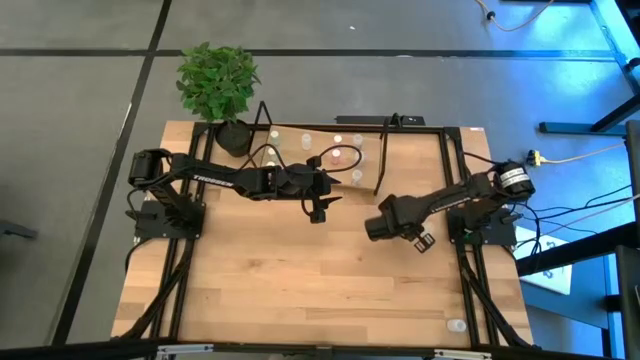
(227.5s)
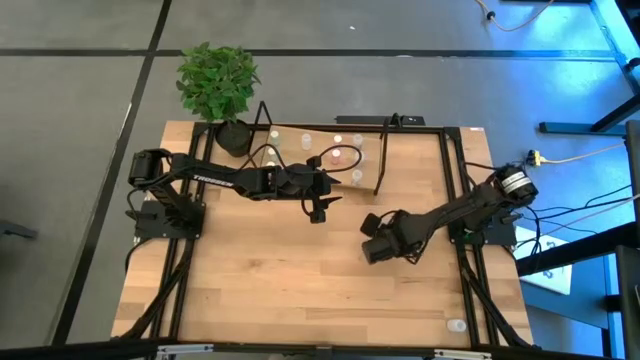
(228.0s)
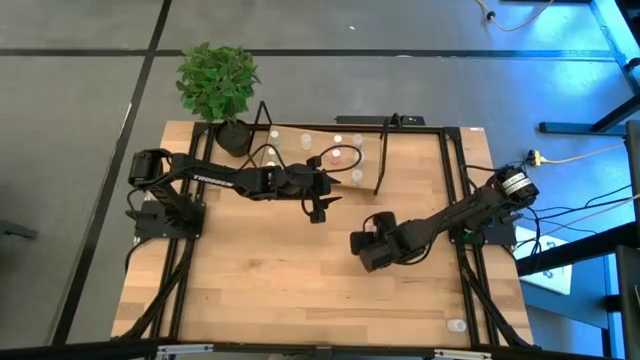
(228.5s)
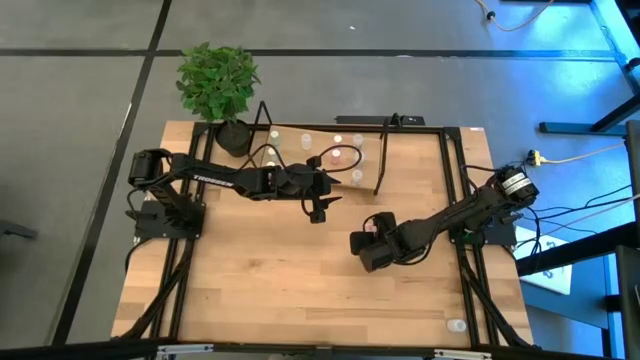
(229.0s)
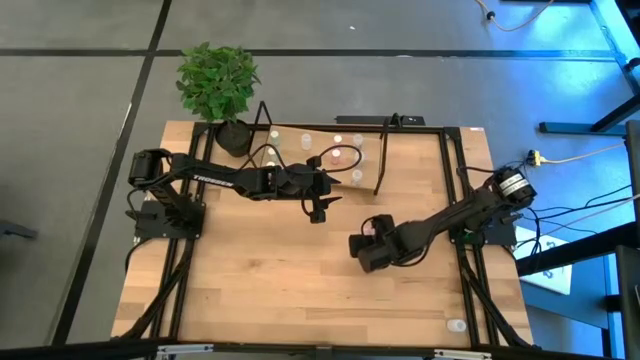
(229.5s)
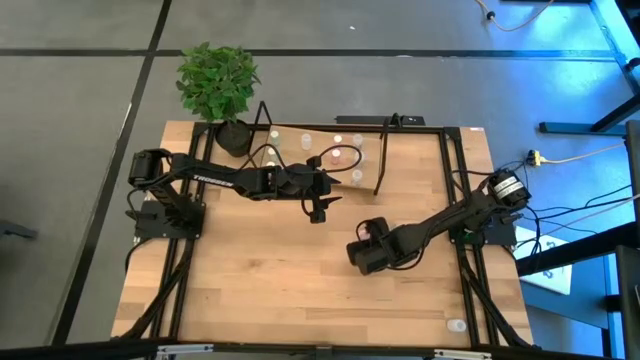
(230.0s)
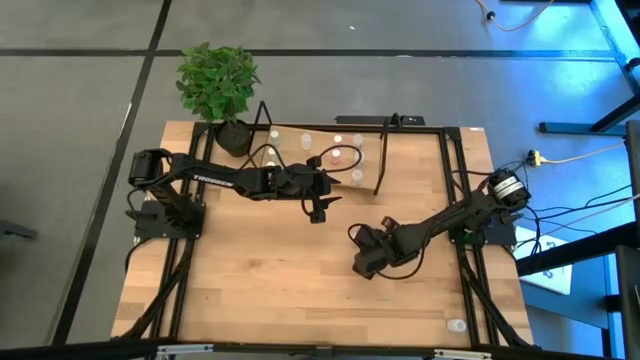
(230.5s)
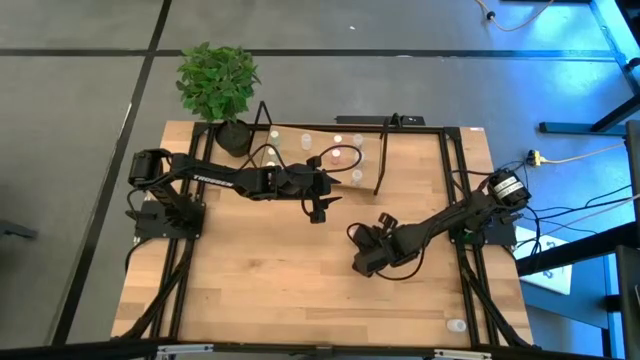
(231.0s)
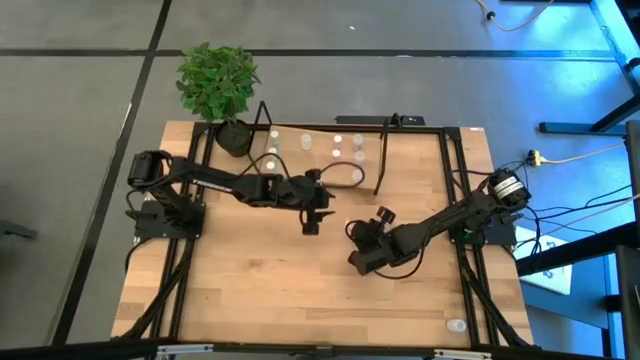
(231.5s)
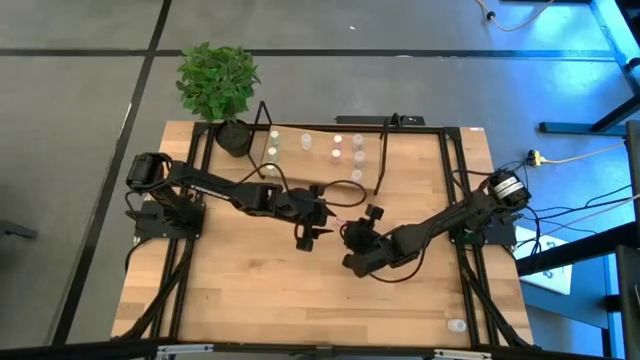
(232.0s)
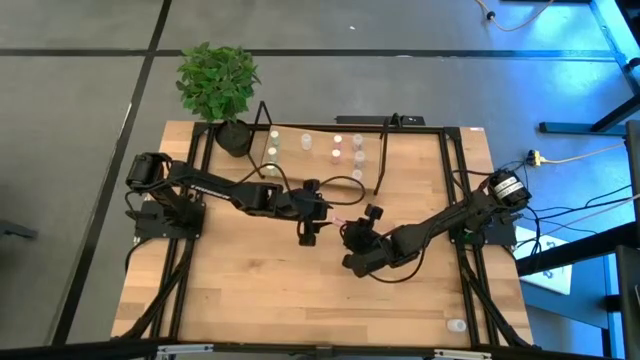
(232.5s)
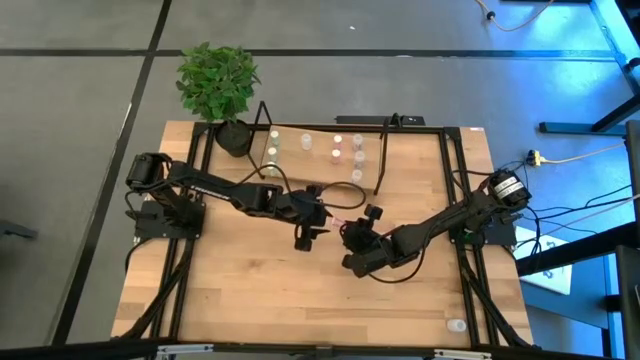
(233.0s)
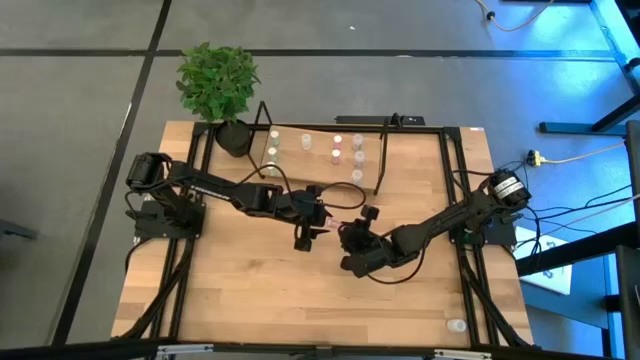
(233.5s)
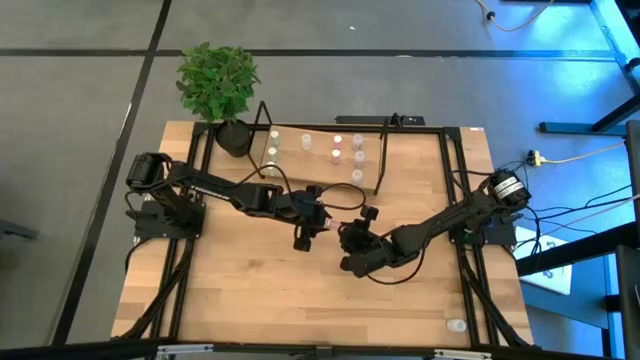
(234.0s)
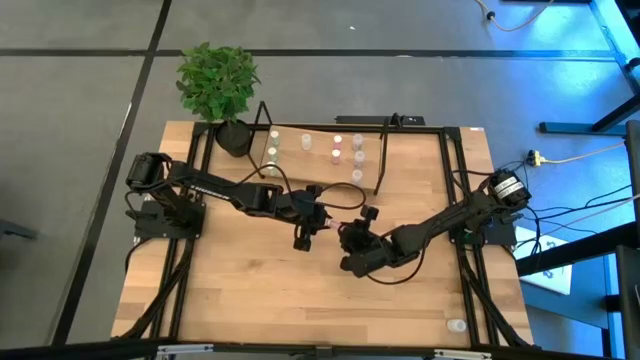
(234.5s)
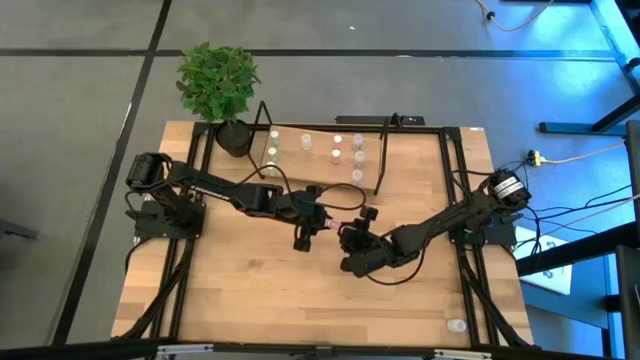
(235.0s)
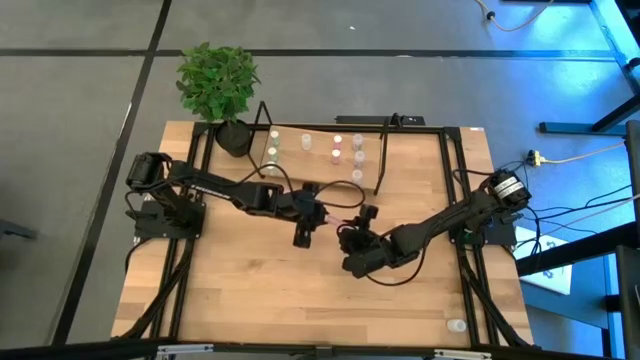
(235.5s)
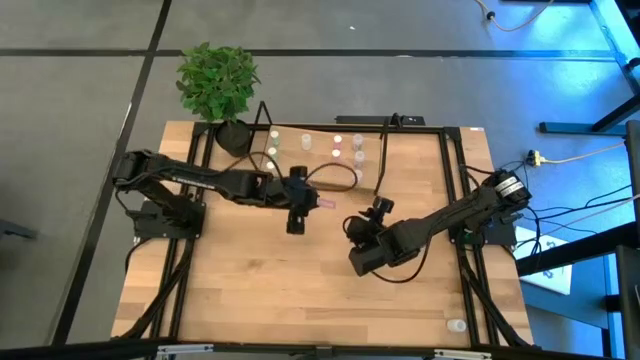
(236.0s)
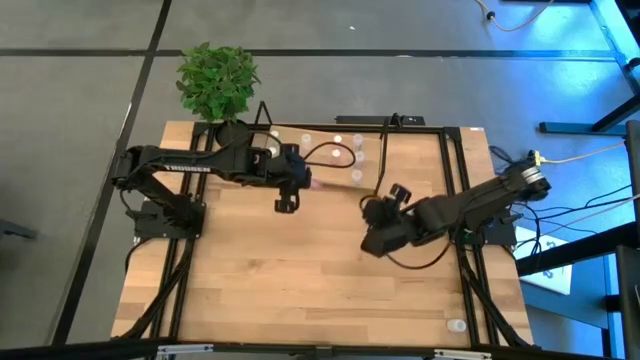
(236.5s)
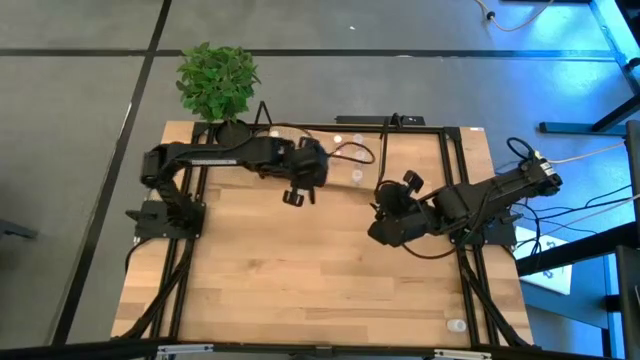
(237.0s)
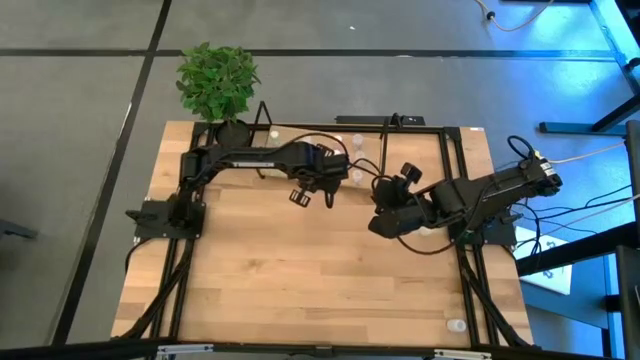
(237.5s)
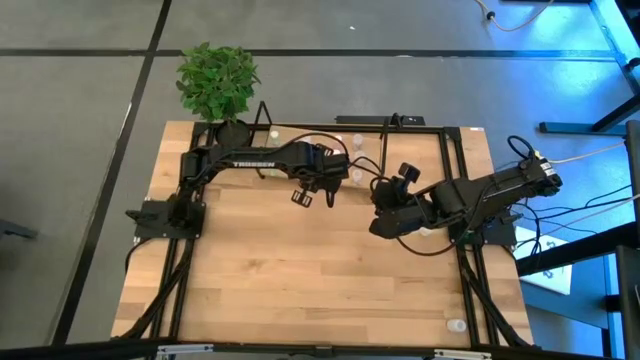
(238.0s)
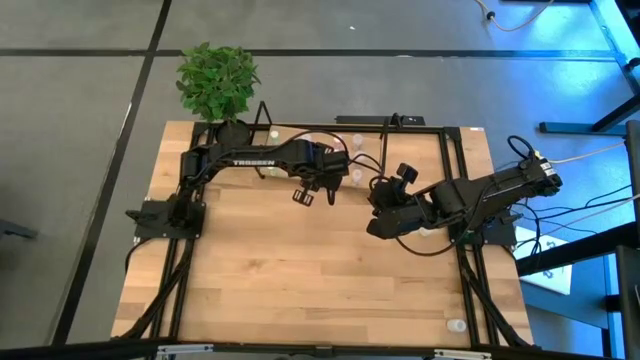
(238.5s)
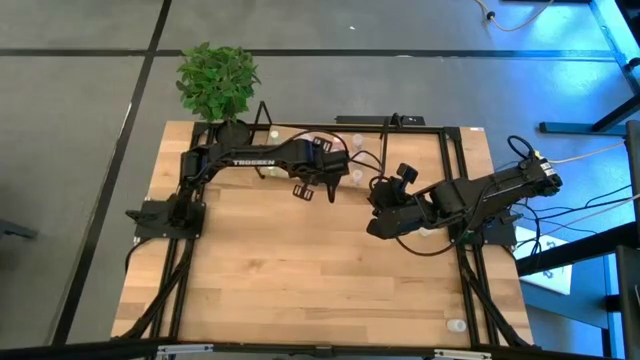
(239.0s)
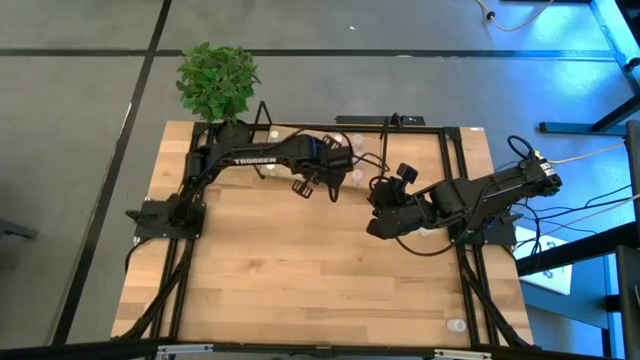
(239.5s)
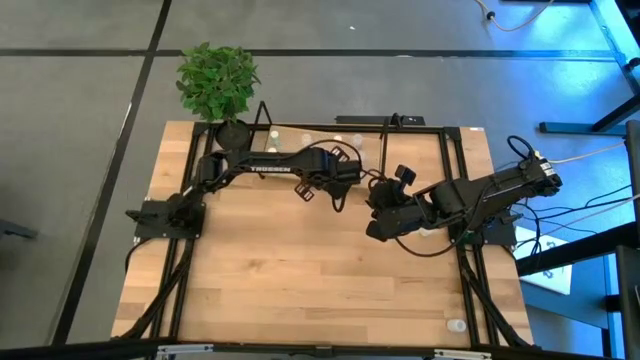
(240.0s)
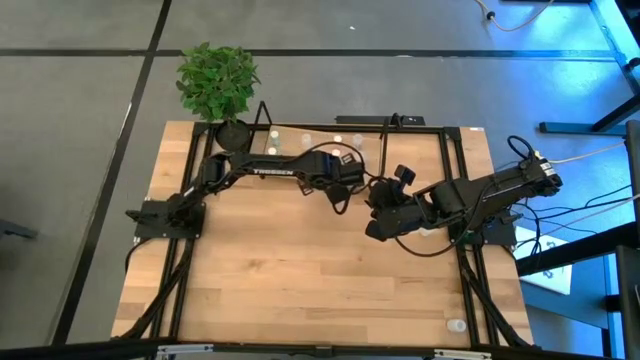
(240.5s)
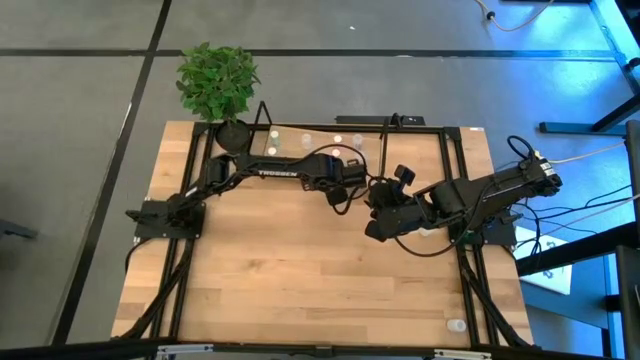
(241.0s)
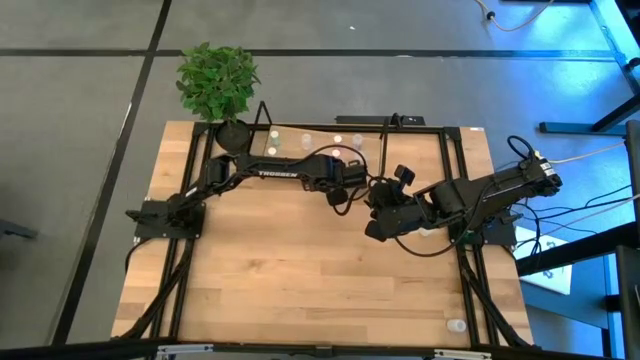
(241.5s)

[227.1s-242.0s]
Task: Pick and place medicine bottles onto shelf by color
Put the pink medicine bottle on the shelf aligned with the other pink medicine bottle

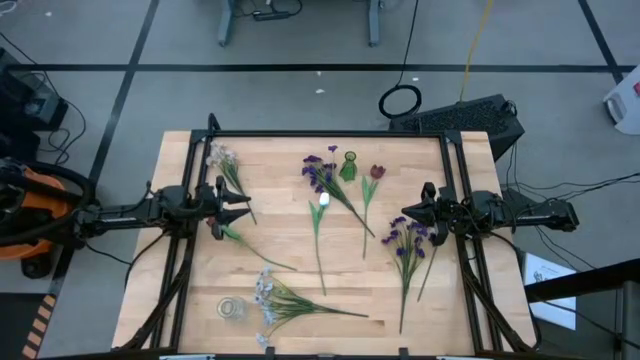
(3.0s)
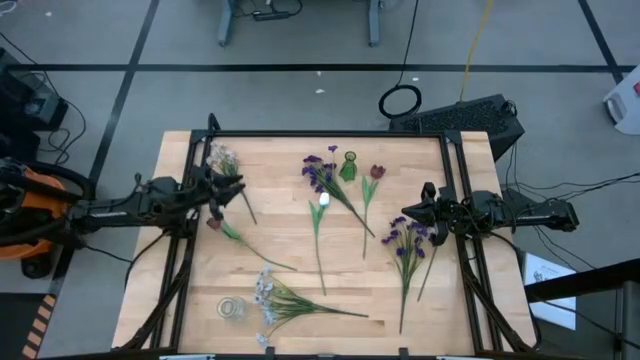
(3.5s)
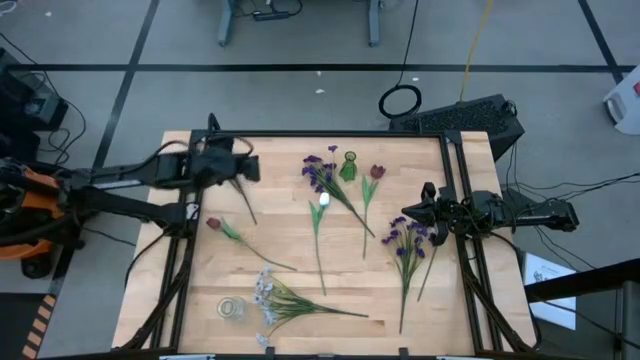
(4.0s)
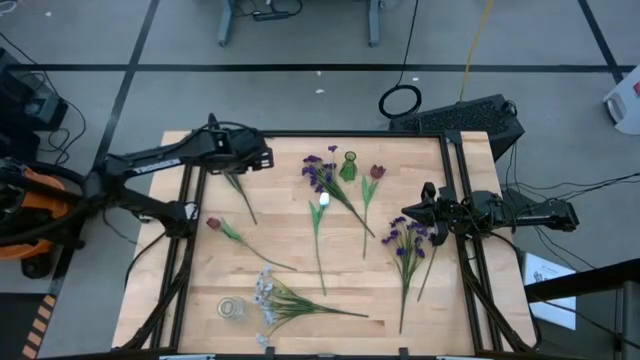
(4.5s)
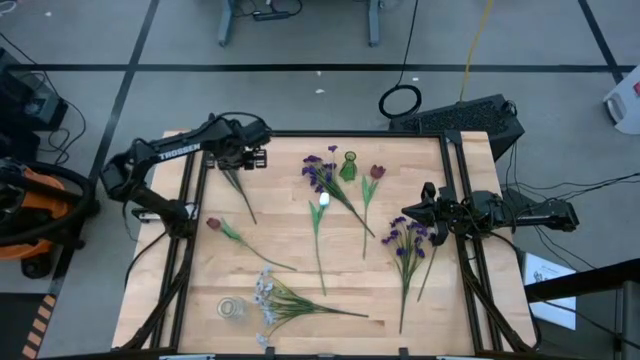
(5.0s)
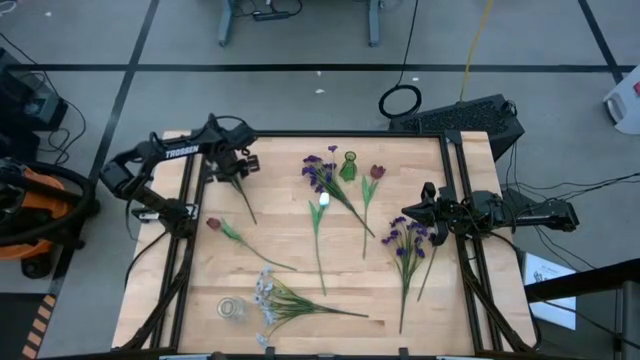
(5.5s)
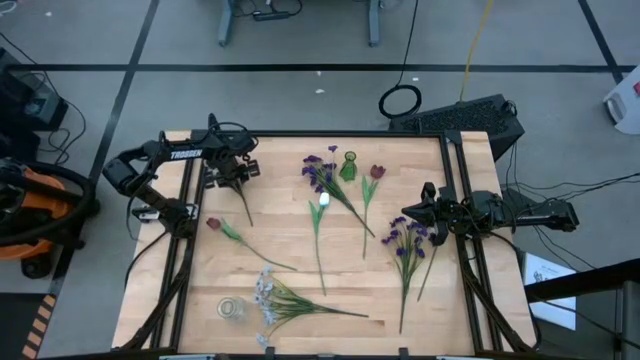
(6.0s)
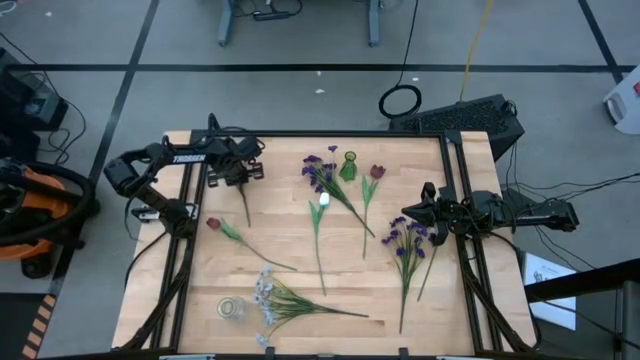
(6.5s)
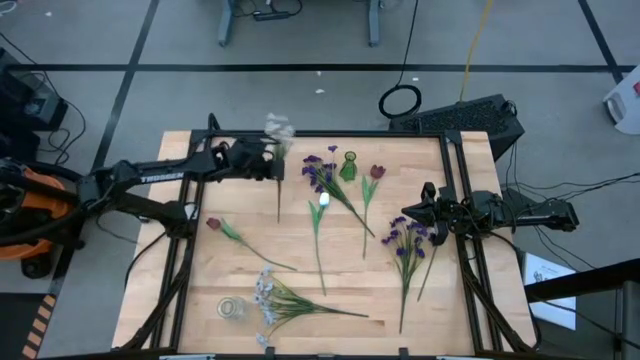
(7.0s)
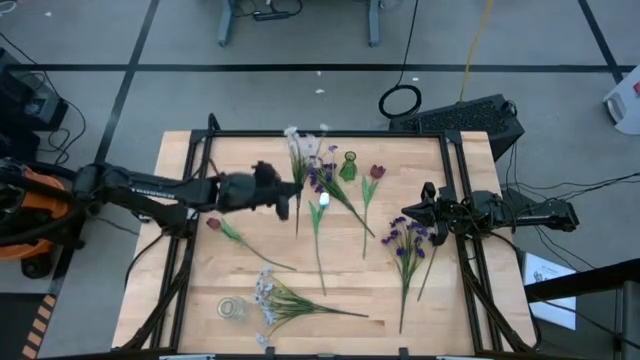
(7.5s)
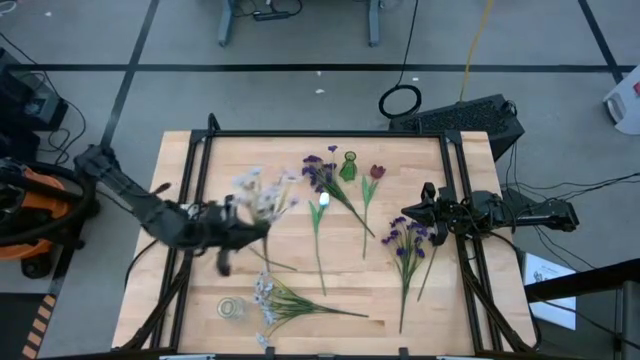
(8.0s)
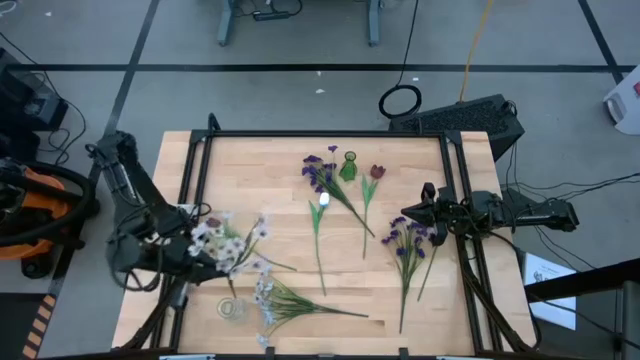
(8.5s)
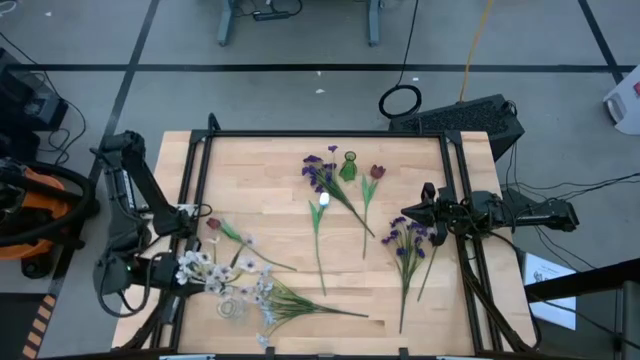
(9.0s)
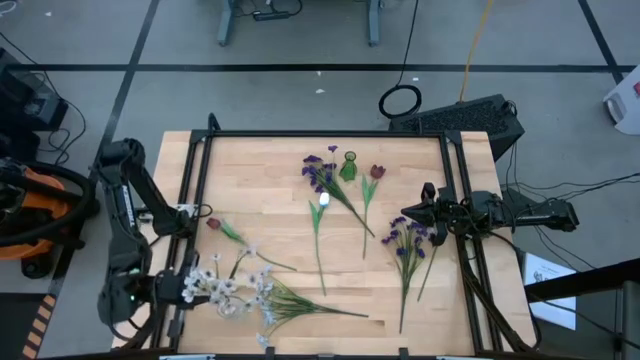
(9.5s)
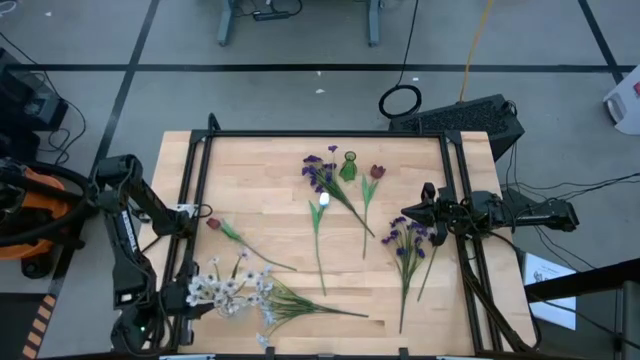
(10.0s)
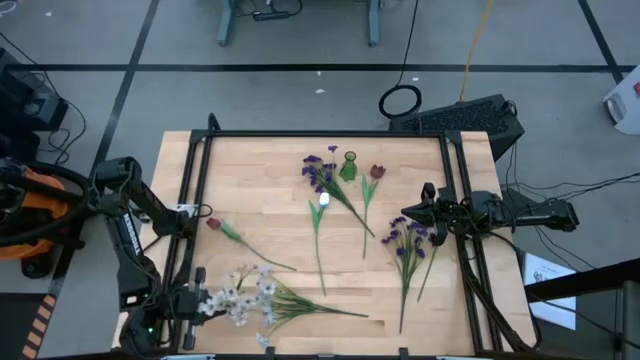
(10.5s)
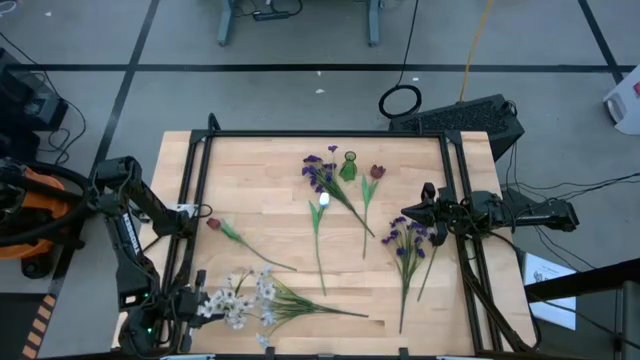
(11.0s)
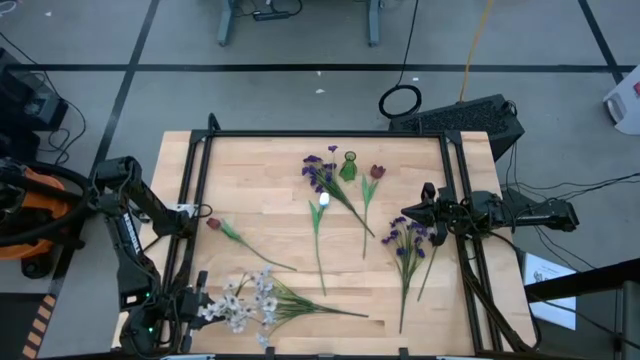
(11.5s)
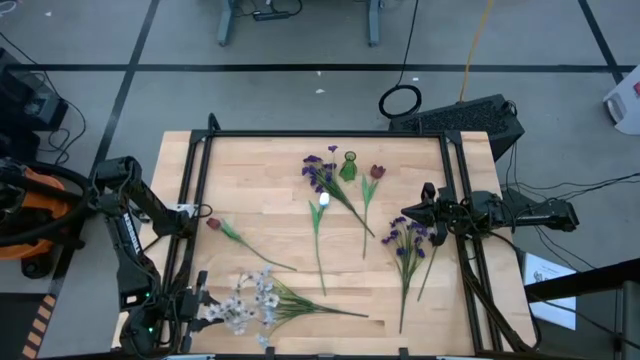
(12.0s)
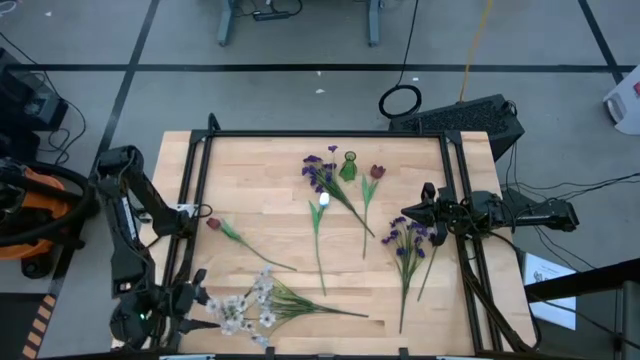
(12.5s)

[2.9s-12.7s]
Task: Sort flowers into vase by color
Put the top white flowers into the transparent flower vase
